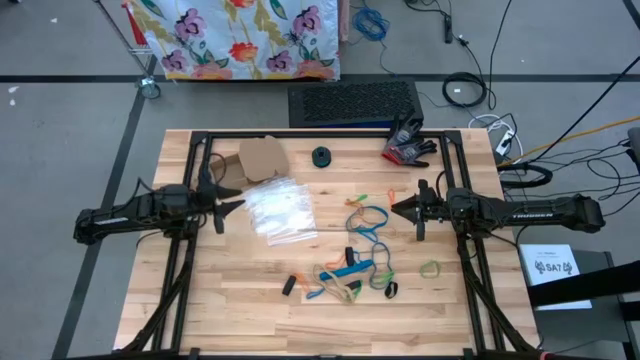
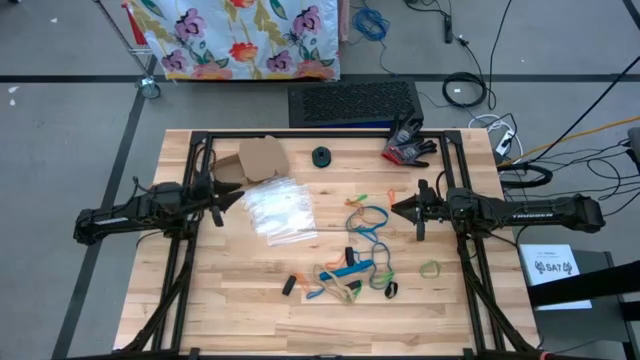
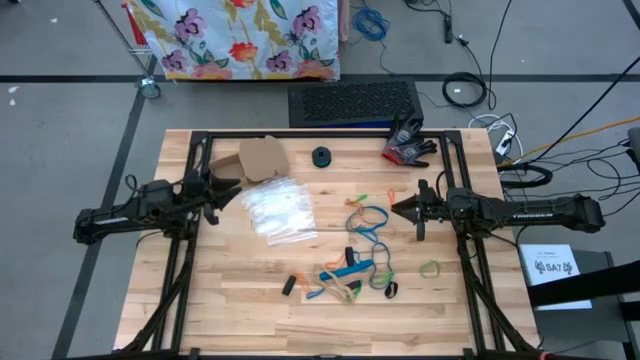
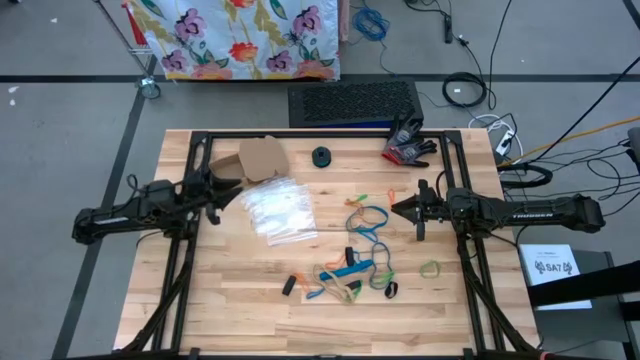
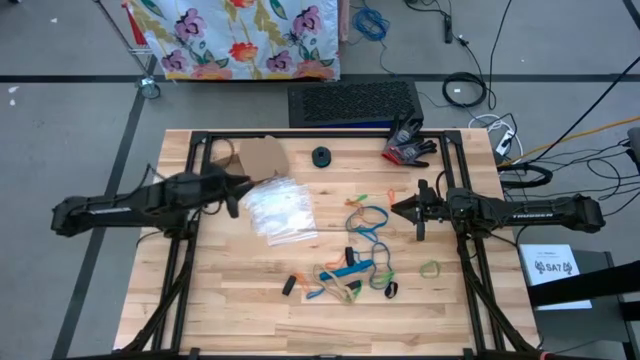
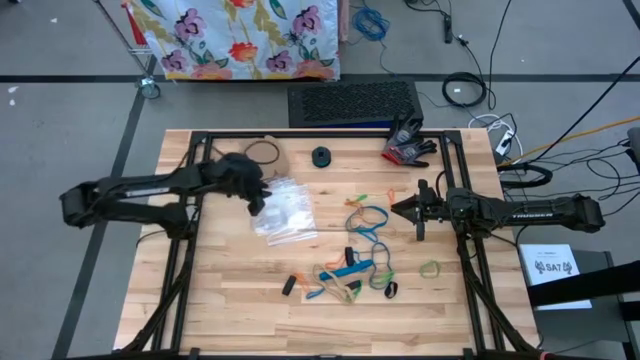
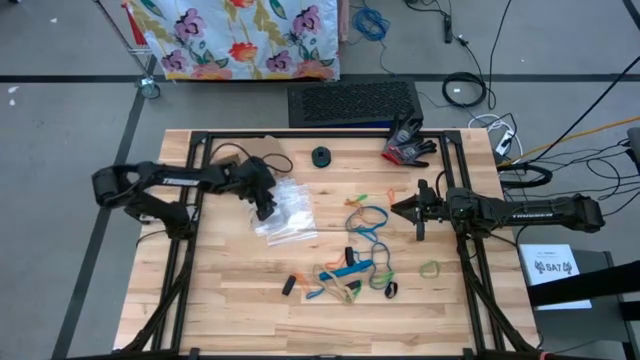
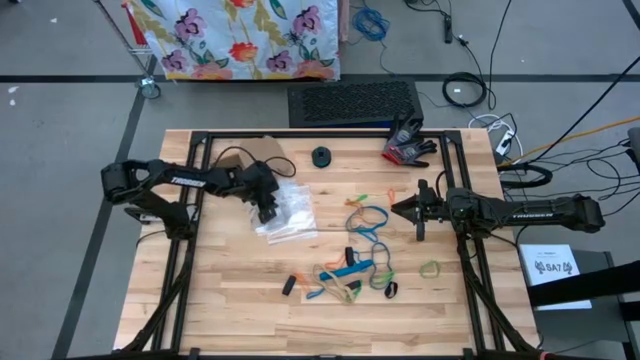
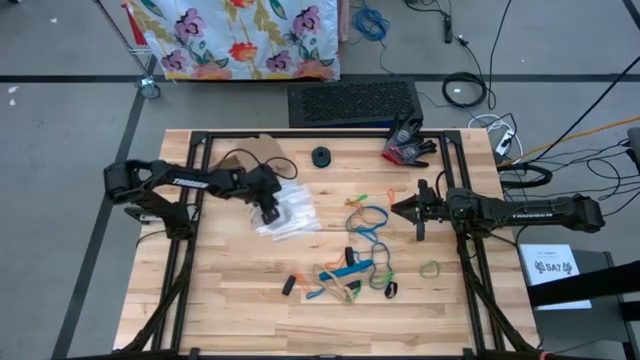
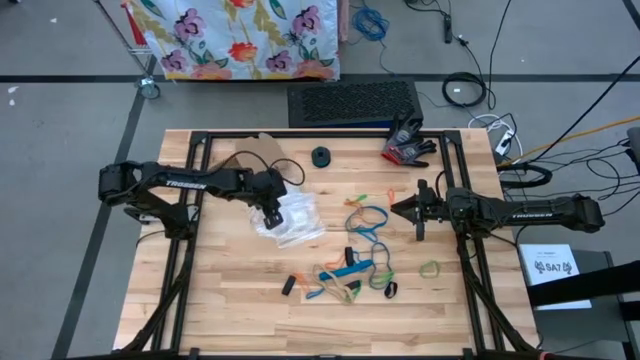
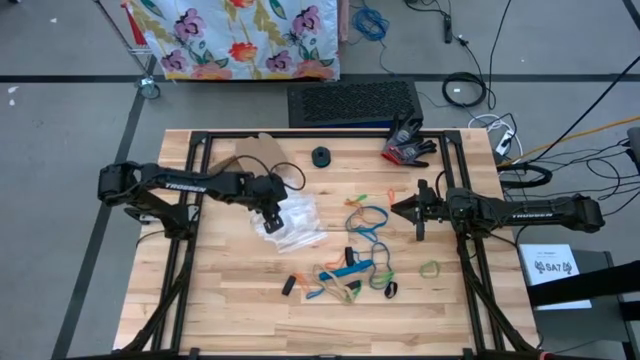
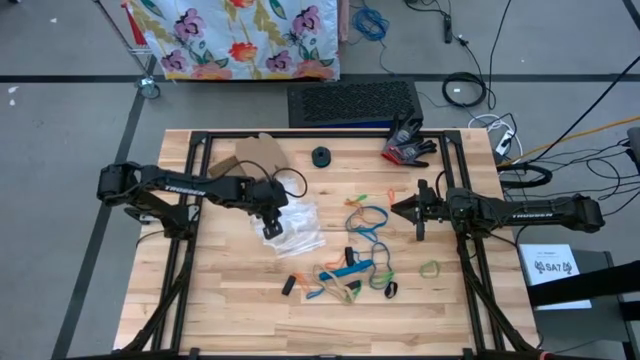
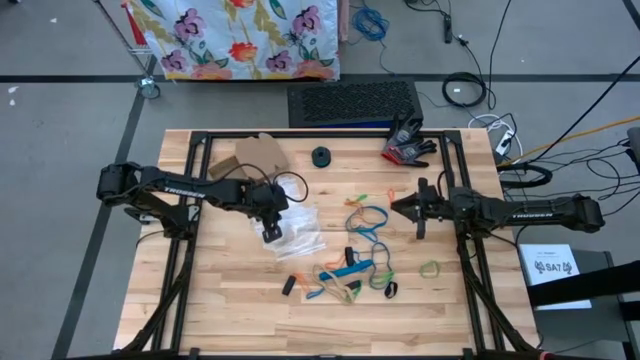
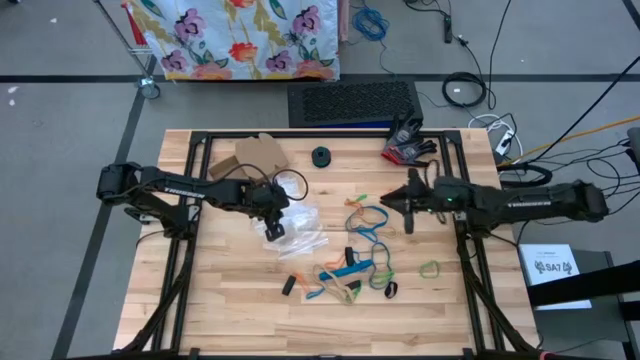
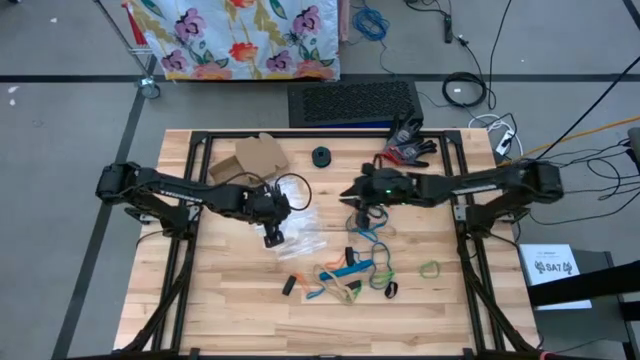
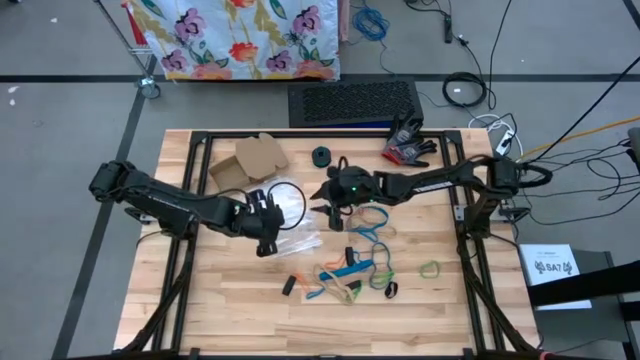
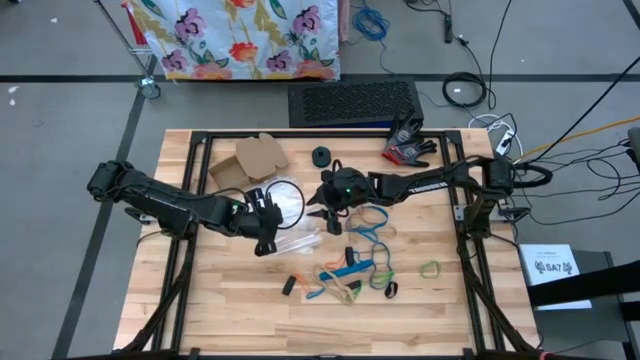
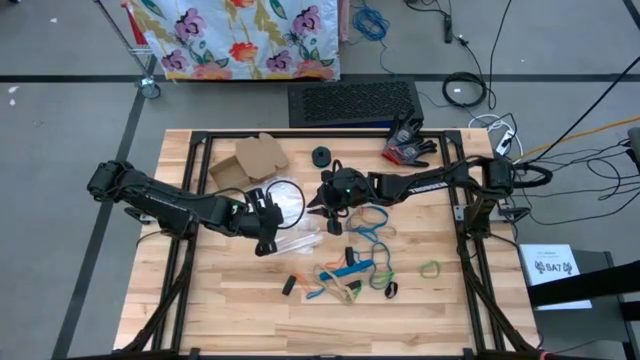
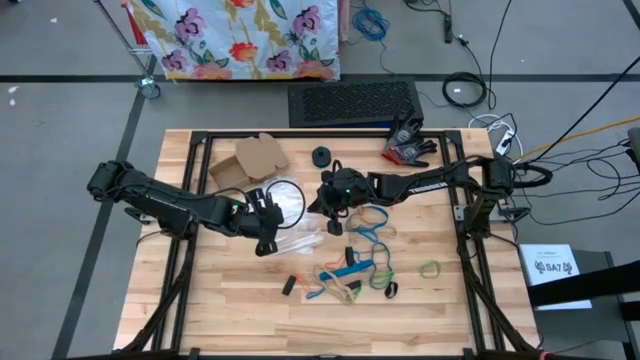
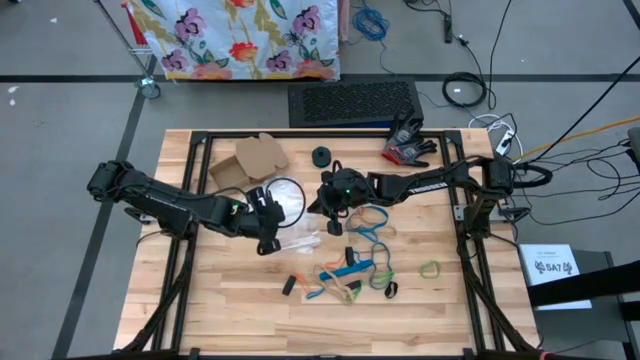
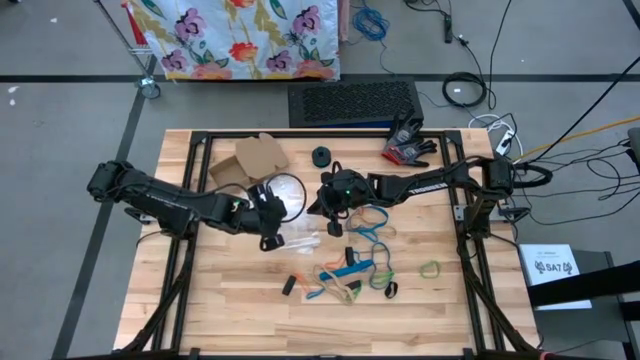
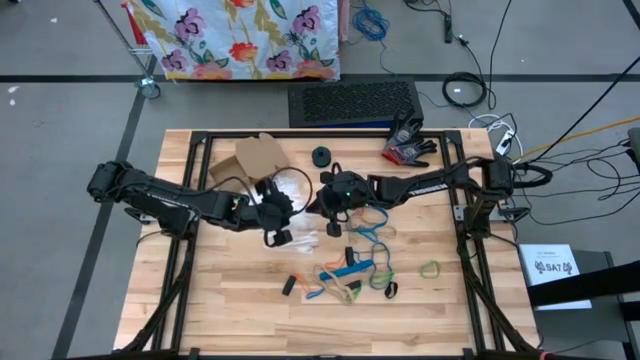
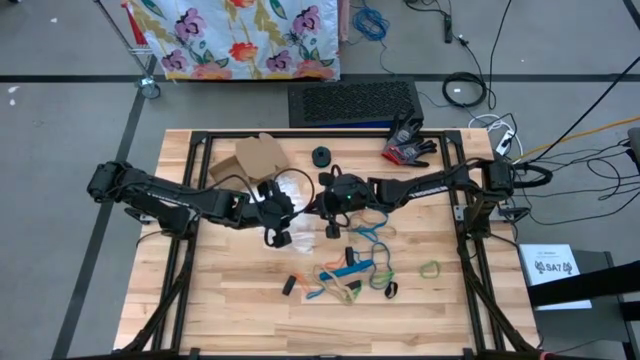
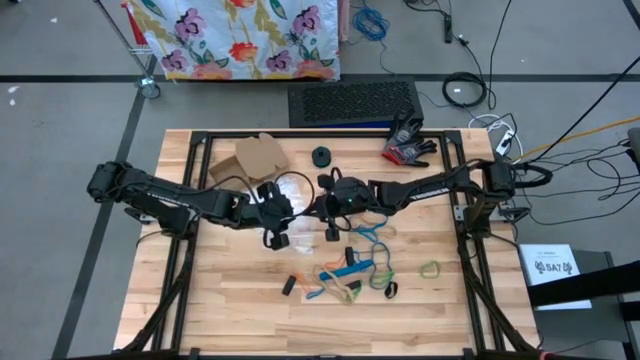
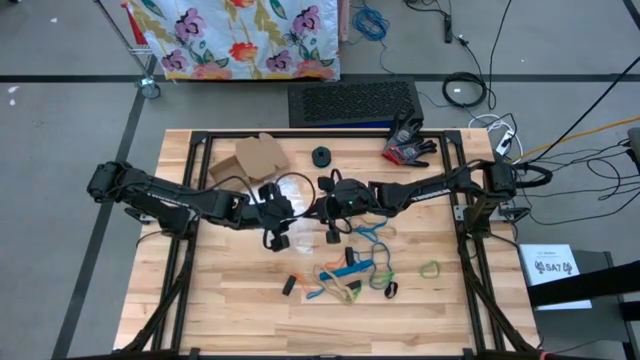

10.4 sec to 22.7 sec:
Task: Sort rubber bands
Open the transparent zip bag

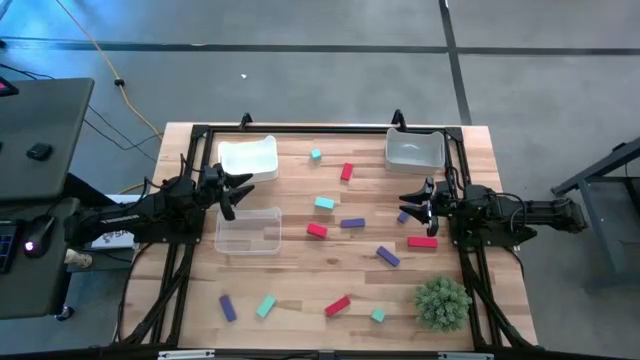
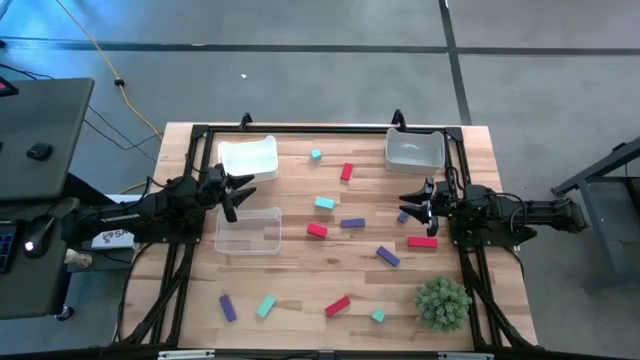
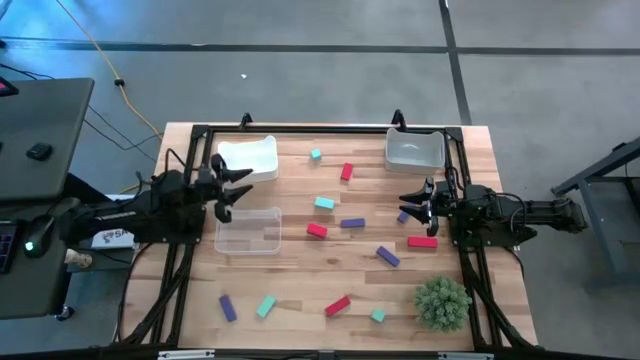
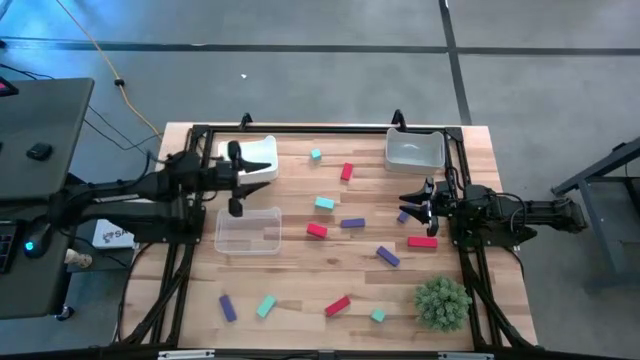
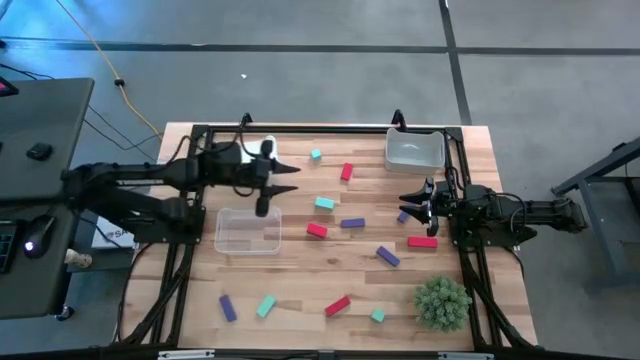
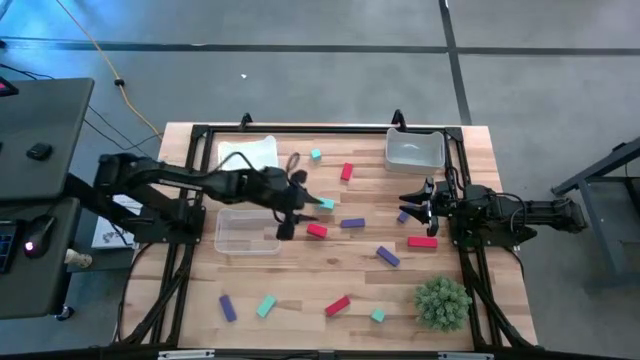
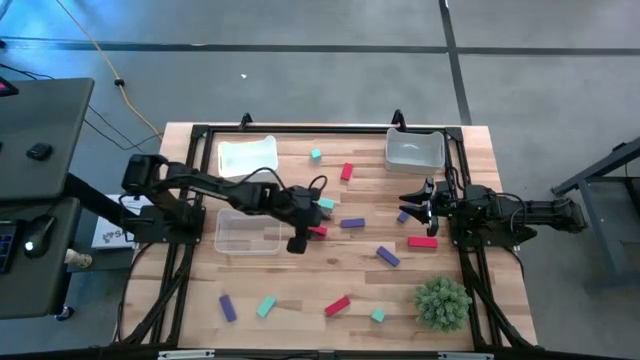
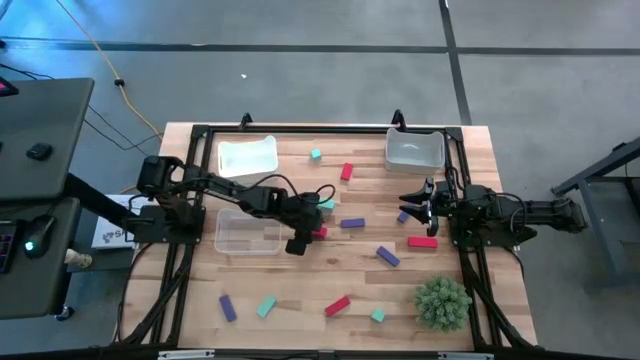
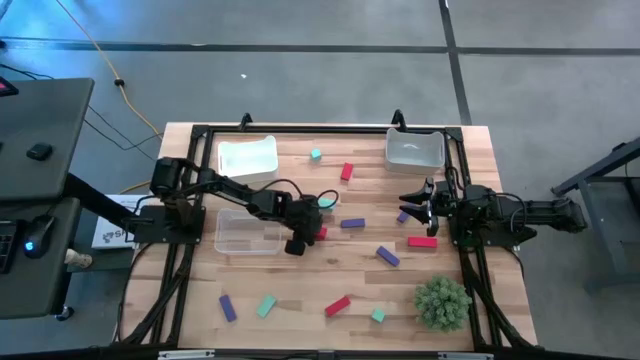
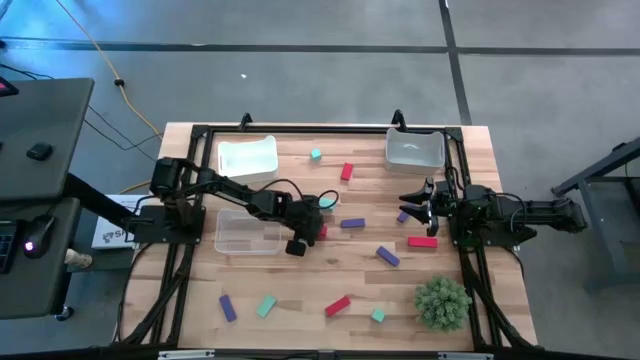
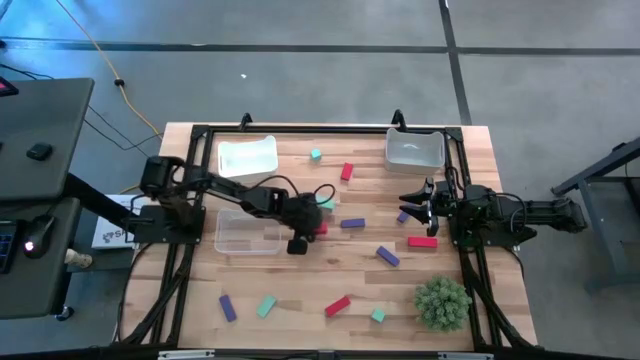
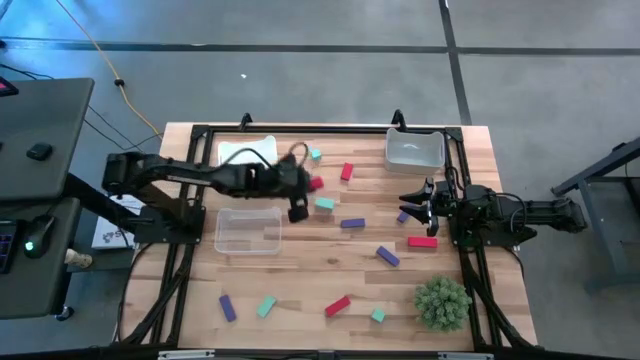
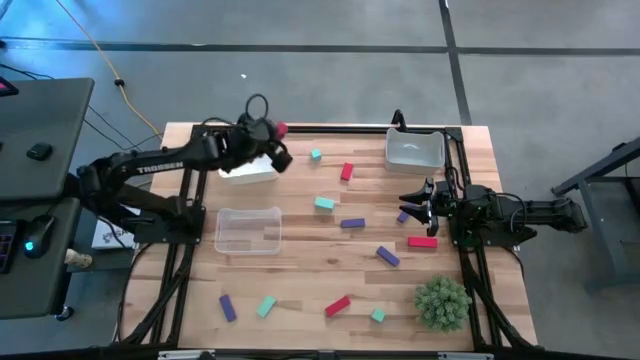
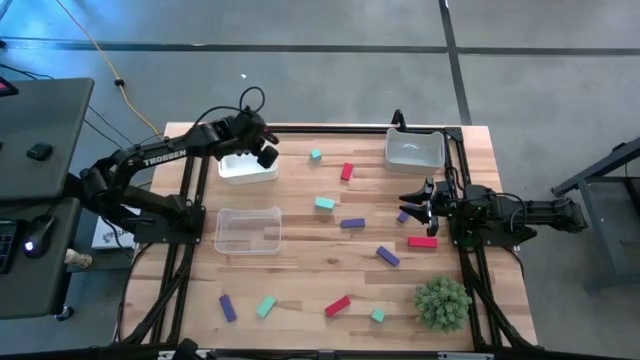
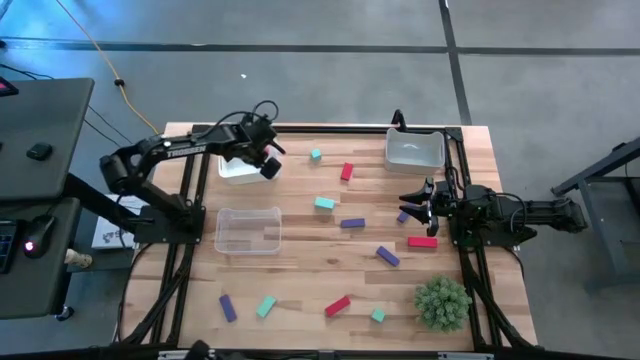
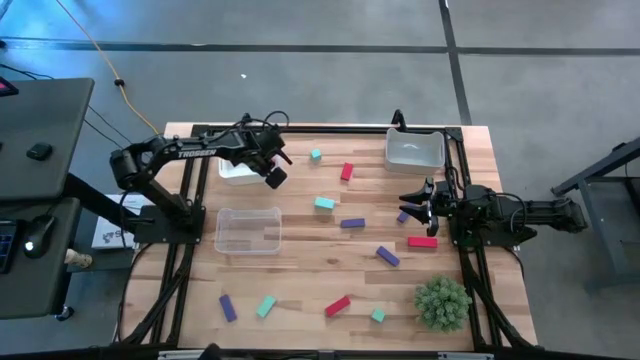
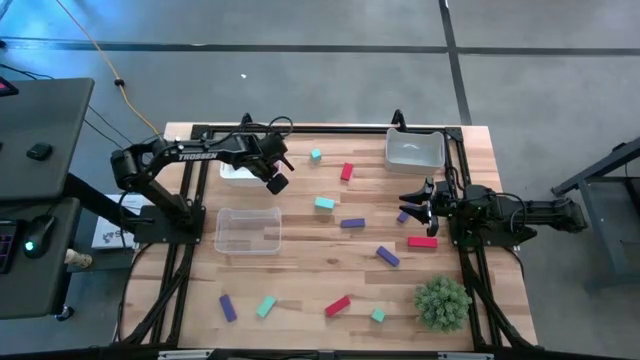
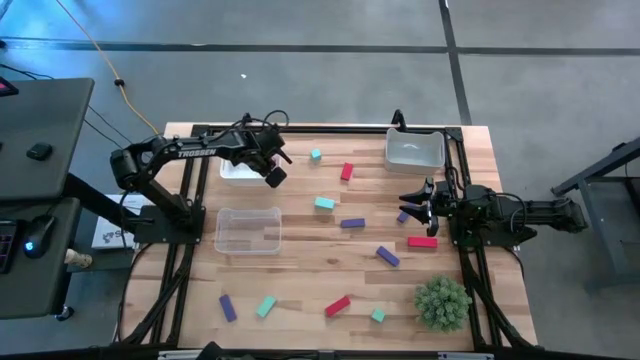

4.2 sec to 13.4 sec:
Task: Sort & place blocks by color
Put the red block into the white bin
